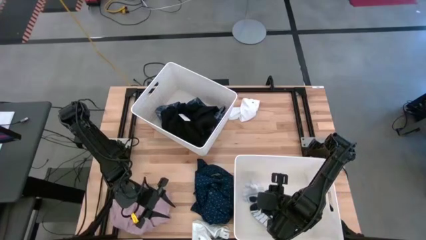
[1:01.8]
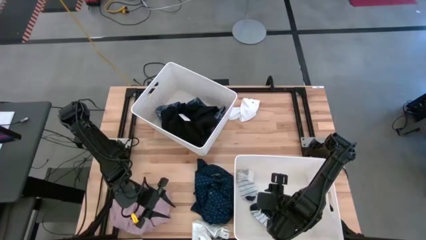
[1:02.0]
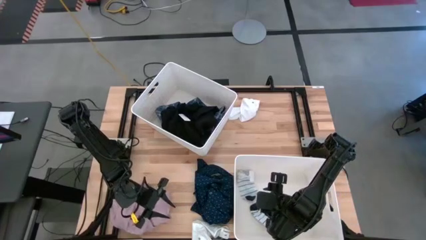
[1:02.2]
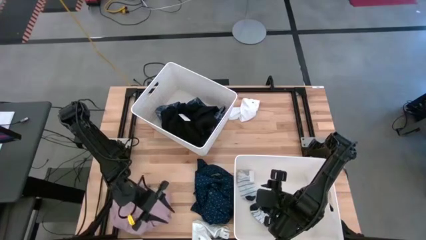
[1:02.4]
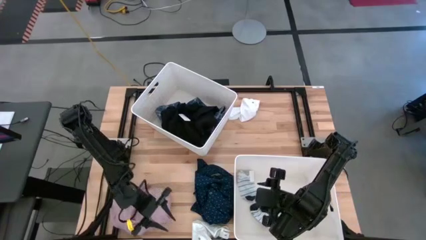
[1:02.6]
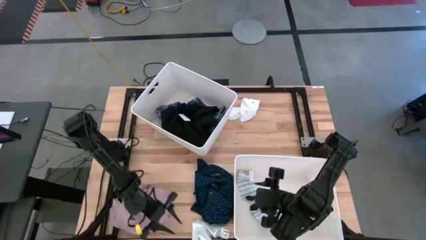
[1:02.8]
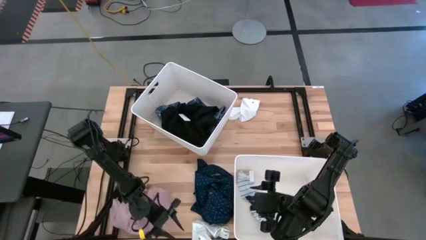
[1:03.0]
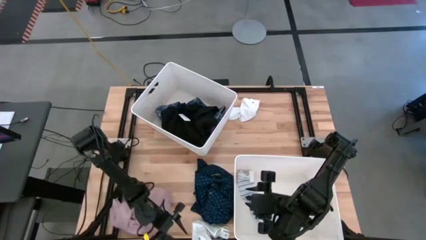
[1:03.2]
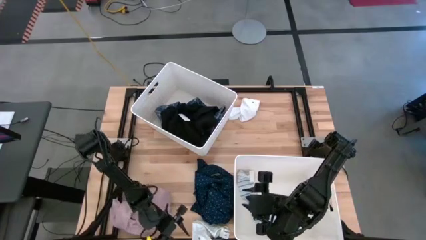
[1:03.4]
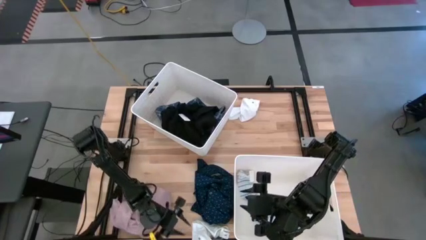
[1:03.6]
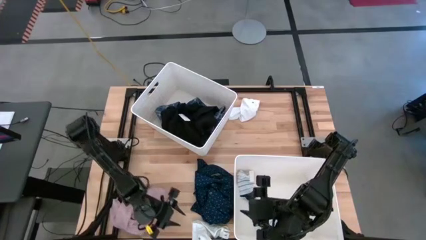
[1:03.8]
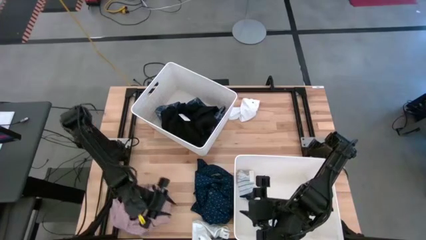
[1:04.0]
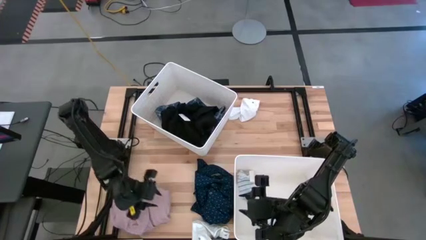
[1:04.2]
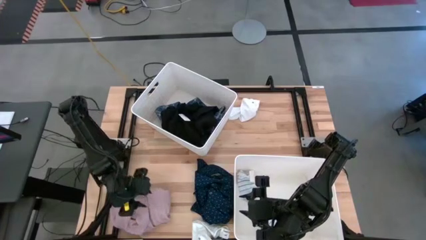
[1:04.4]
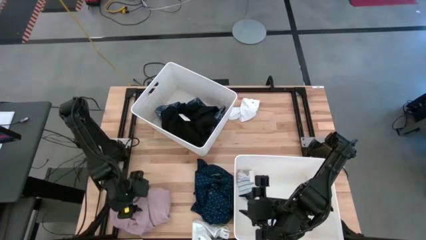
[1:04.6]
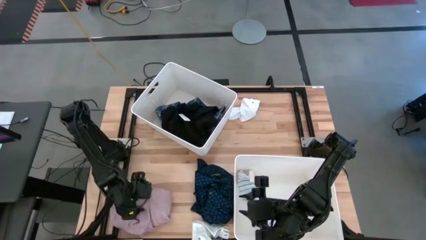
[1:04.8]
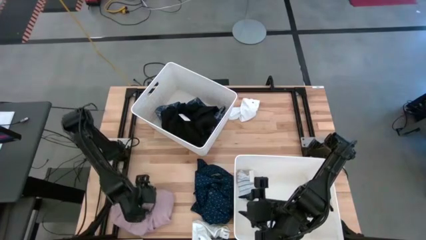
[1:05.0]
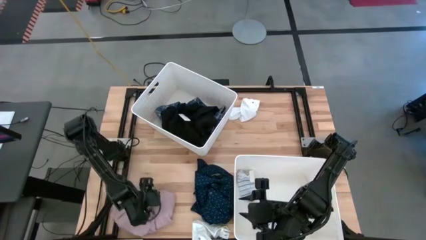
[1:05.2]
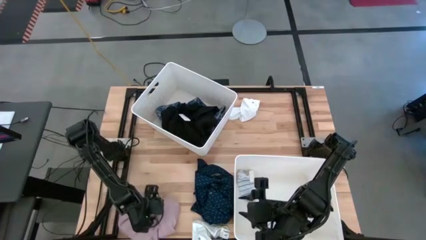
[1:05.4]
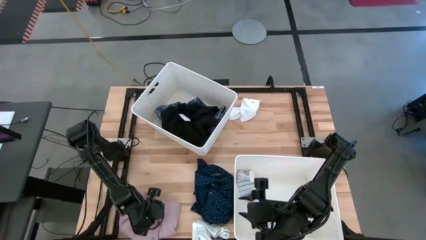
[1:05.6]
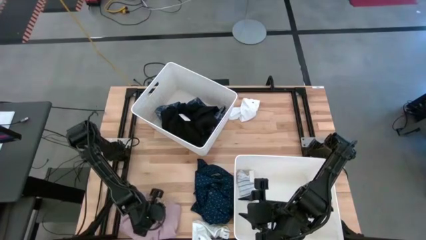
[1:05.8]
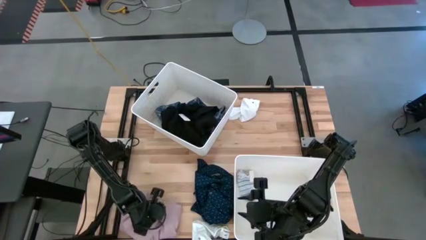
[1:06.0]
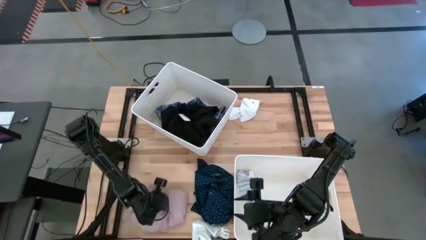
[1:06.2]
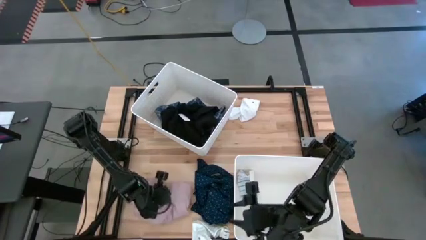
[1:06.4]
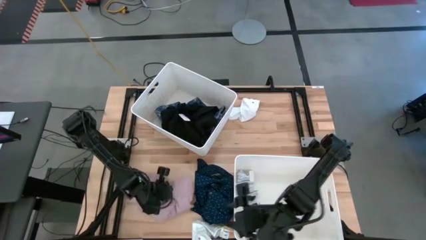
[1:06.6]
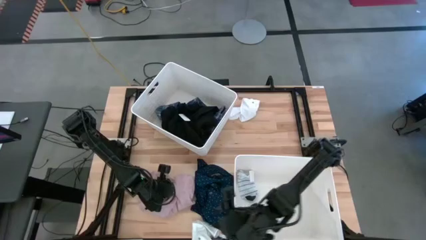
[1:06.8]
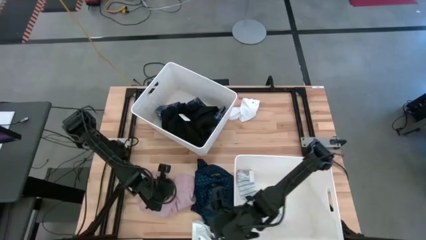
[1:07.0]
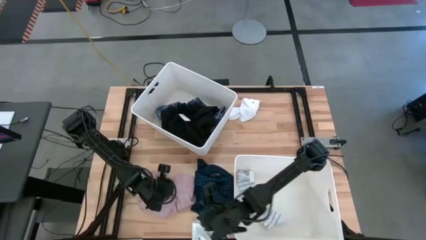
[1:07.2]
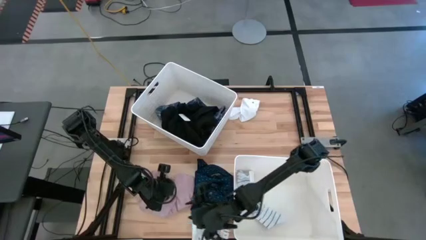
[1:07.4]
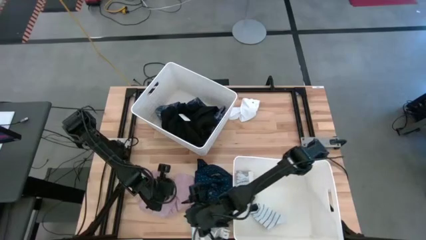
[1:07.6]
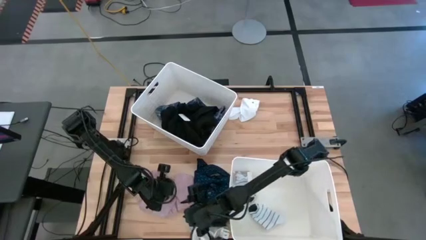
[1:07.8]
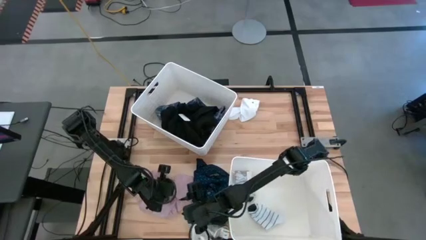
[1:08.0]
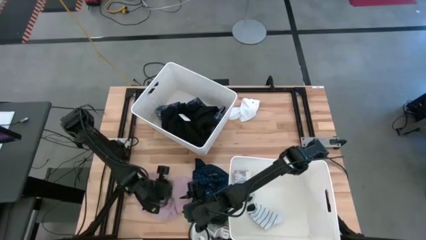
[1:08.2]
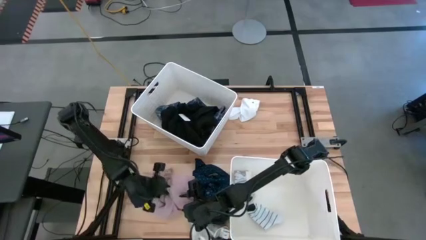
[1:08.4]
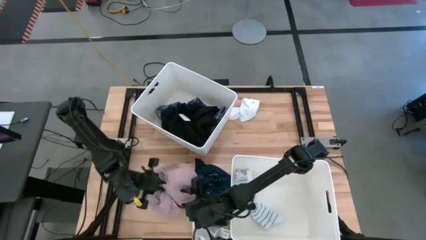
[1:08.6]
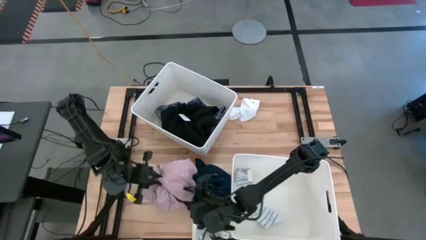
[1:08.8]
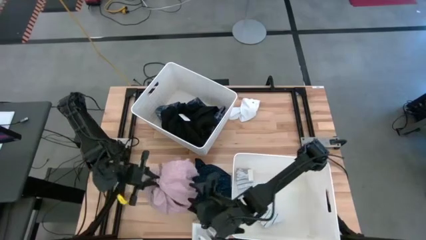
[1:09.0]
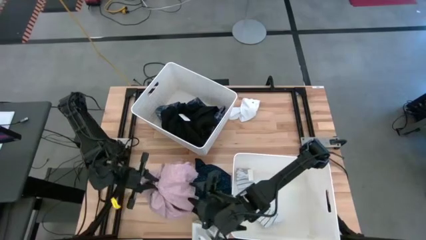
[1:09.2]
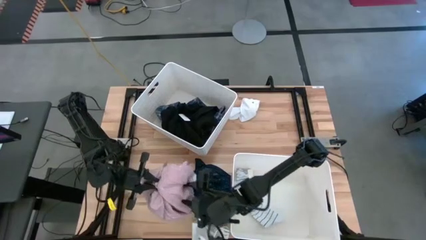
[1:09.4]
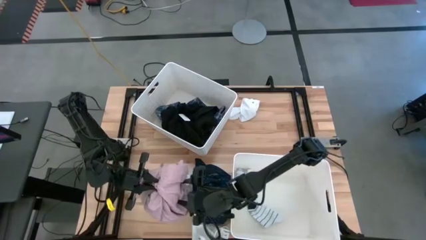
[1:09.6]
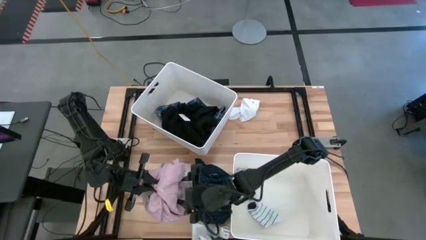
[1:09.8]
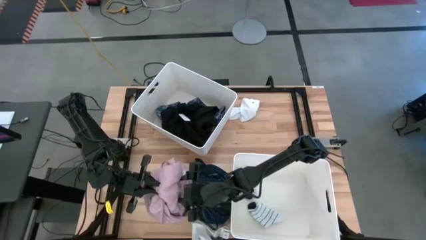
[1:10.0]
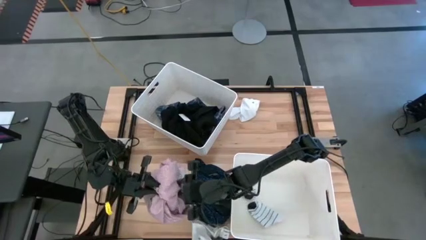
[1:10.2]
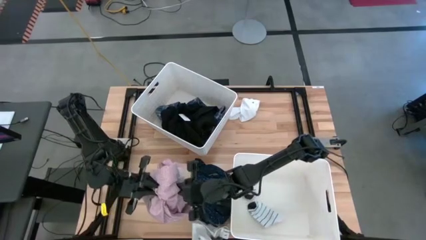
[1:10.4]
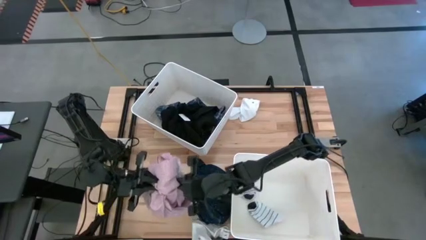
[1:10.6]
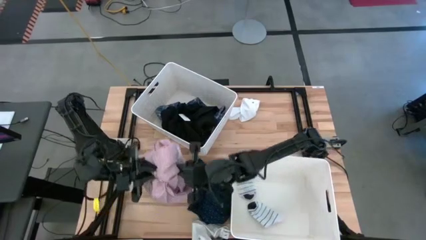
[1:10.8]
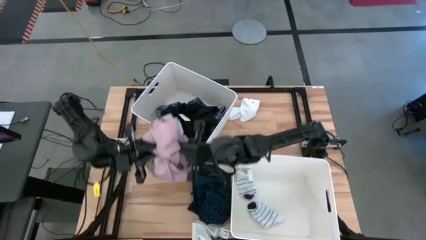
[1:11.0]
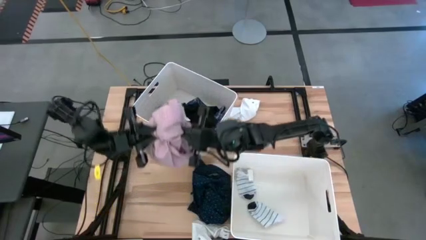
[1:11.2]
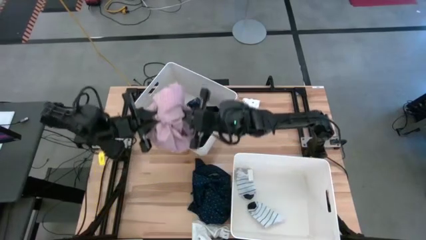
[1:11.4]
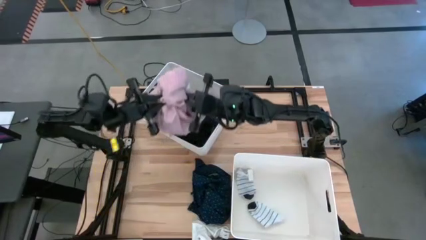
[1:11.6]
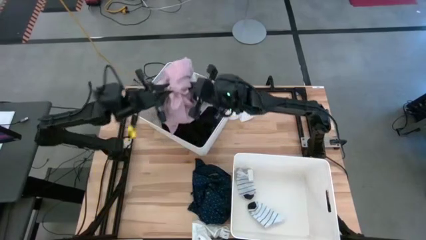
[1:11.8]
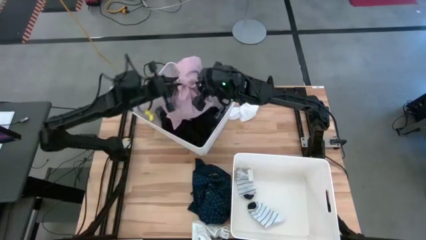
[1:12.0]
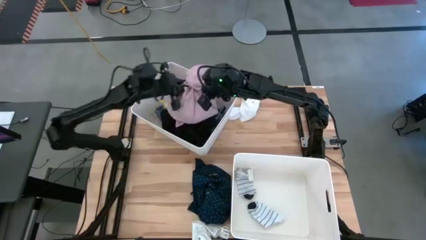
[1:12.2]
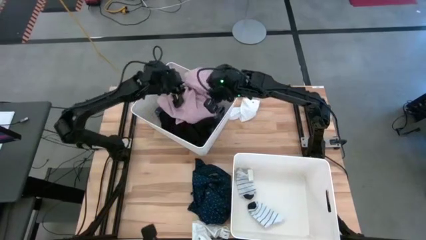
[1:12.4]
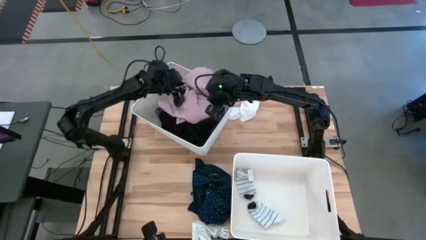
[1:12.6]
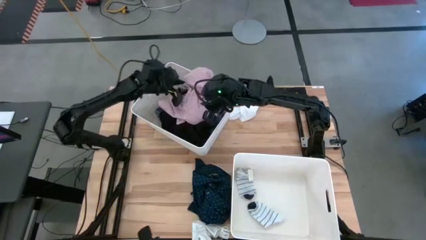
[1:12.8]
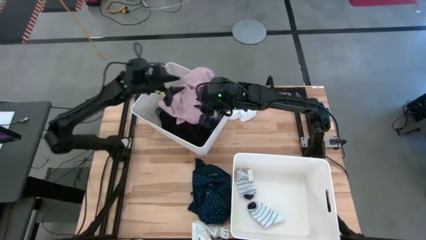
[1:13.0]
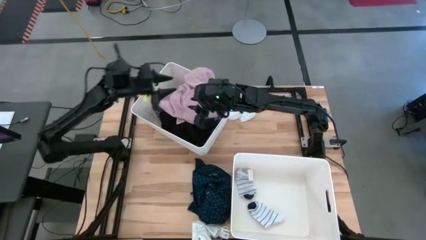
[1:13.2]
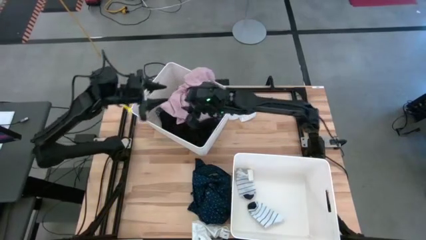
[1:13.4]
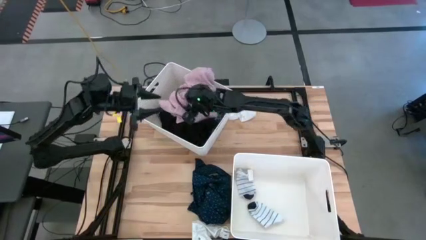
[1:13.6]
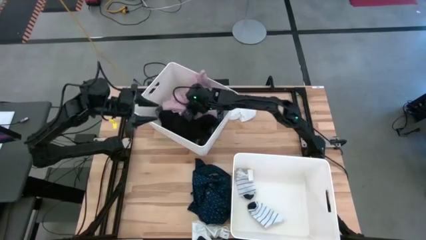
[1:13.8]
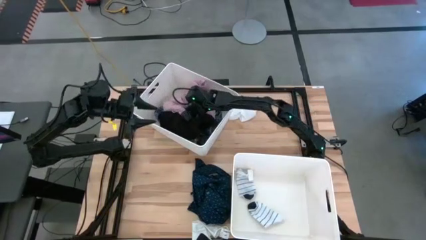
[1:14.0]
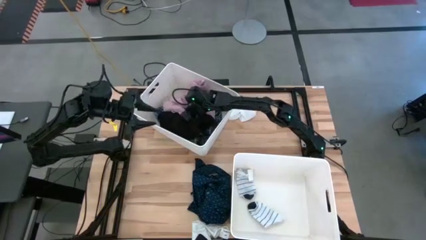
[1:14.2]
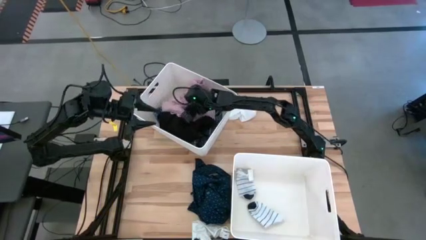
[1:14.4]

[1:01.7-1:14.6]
Task: Sort clothes
Put the pink shirt into the top white laundry bin

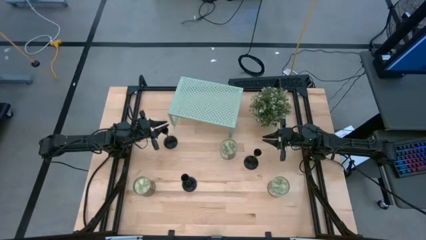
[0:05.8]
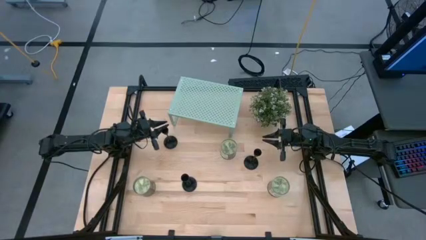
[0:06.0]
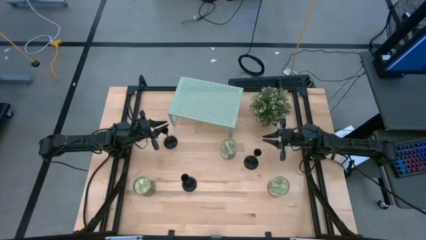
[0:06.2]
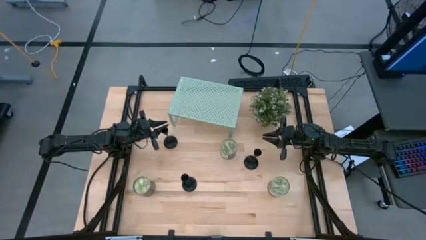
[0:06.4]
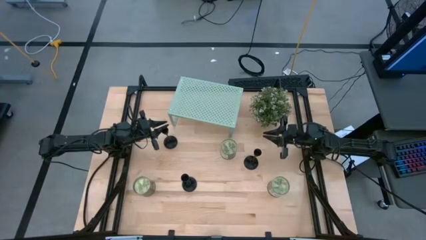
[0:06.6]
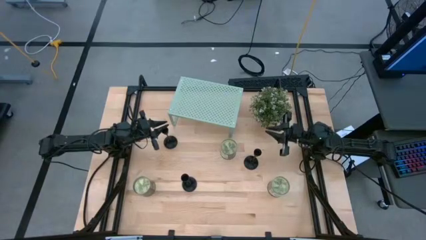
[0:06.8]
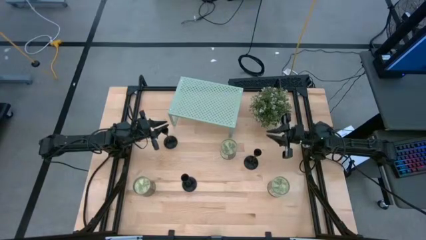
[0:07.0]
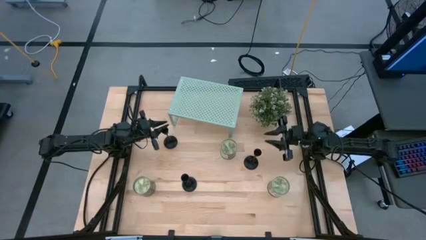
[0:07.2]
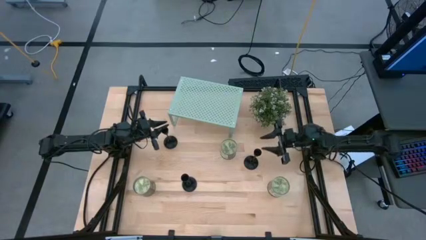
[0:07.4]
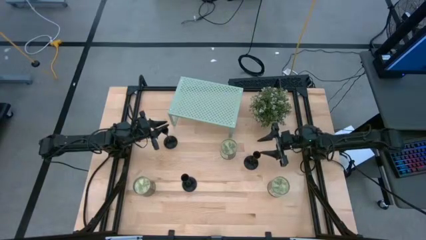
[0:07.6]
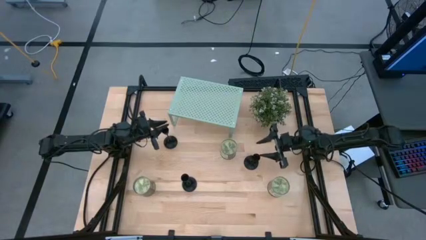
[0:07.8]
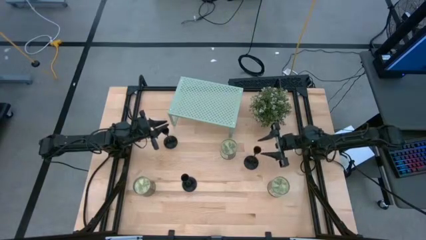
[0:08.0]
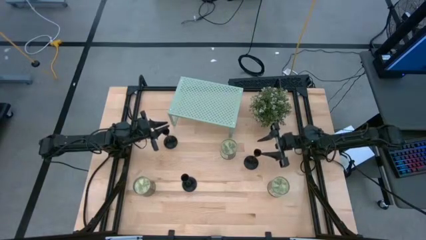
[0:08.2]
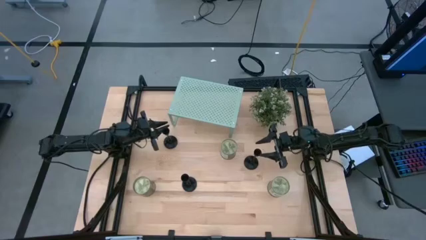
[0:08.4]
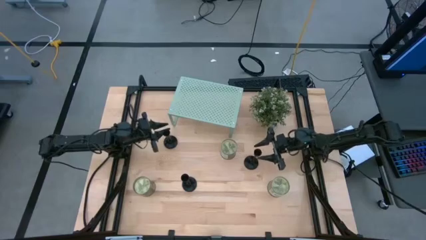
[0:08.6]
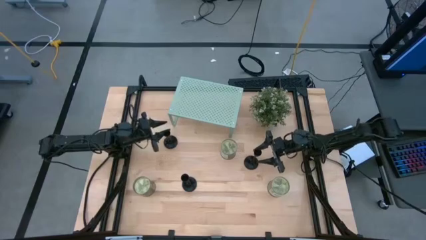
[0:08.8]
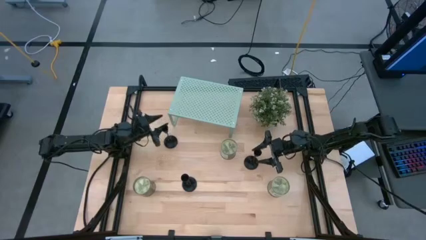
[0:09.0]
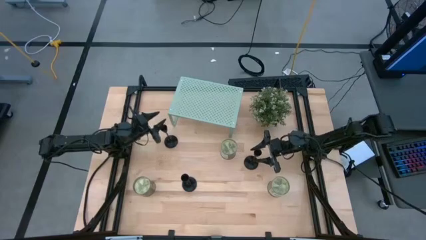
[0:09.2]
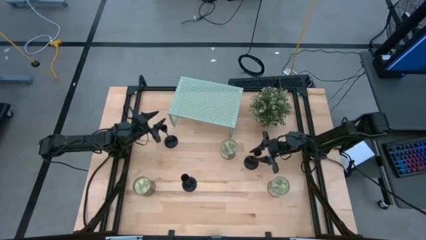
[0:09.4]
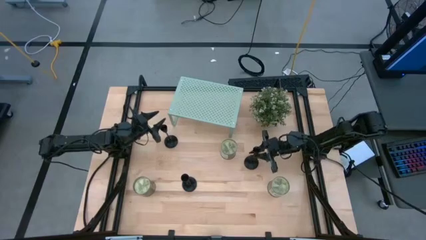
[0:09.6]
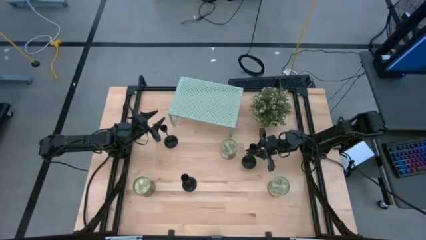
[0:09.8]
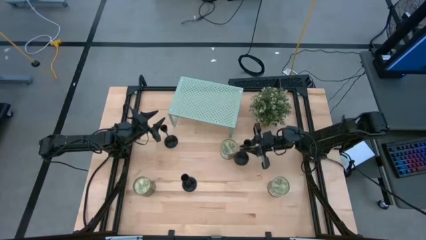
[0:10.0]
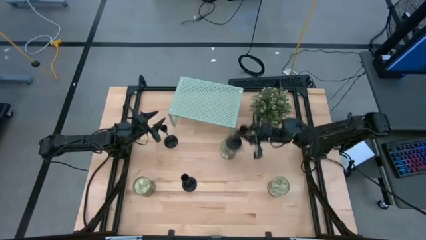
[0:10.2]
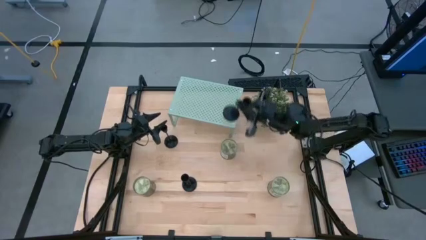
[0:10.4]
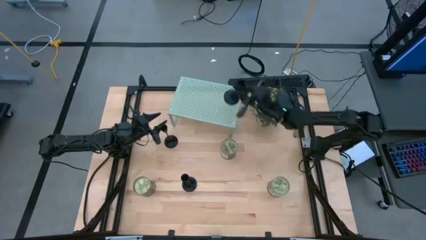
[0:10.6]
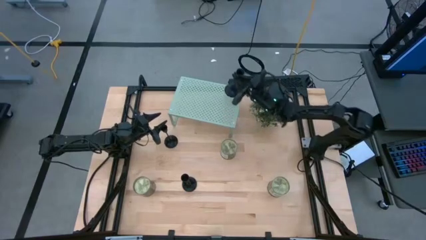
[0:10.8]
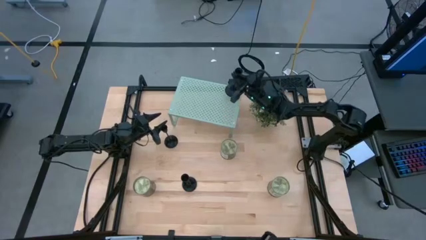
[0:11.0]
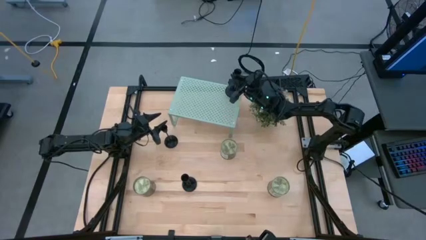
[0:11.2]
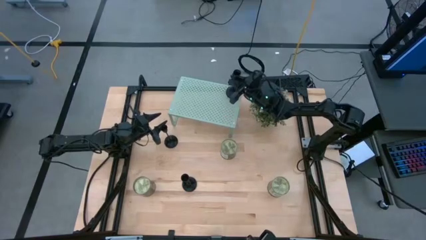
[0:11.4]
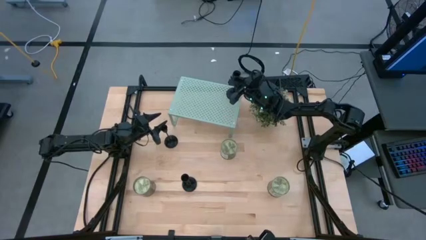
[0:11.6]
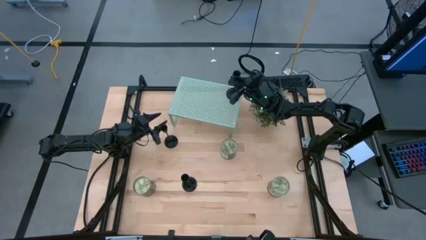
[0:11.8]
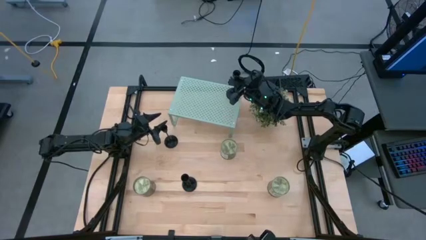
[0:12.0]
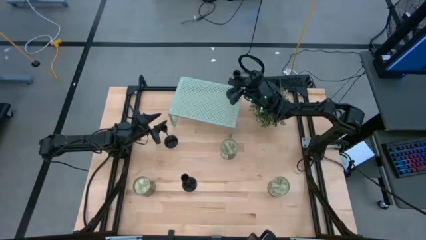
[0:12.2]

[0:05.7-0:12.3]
Task: Pick & Place candle stick holders
Put the right black candle holder on the shelf
